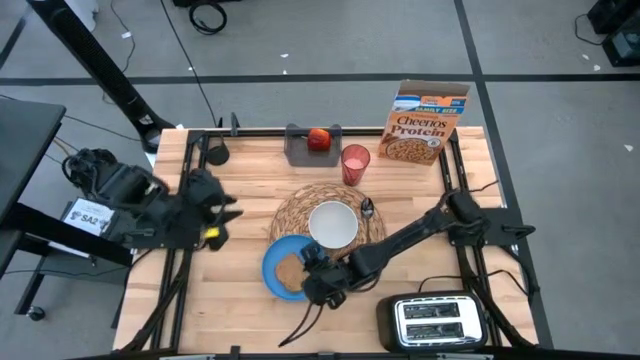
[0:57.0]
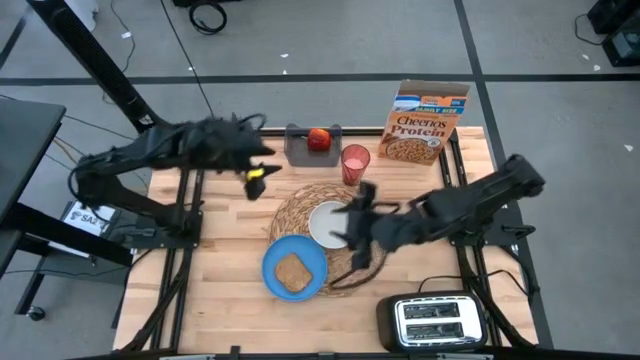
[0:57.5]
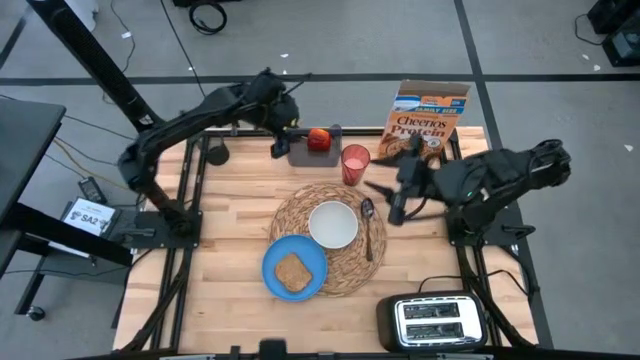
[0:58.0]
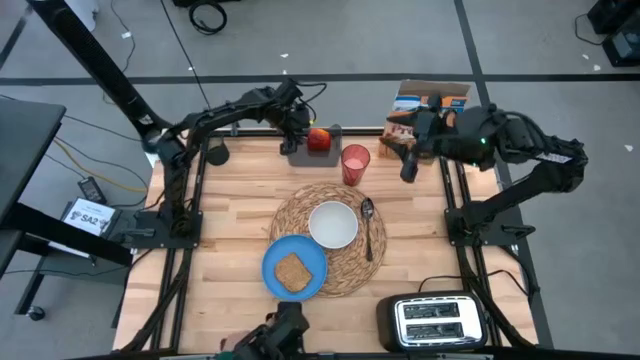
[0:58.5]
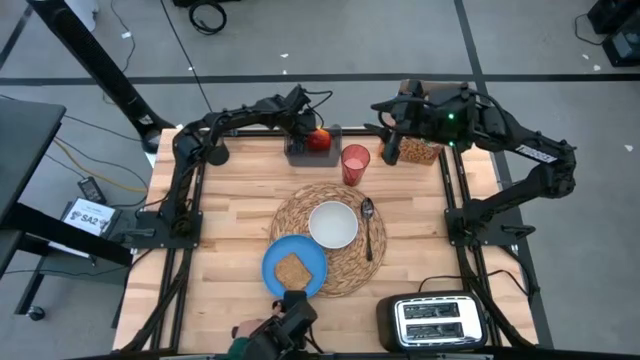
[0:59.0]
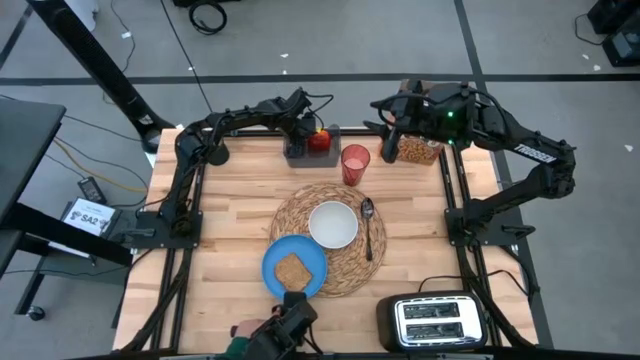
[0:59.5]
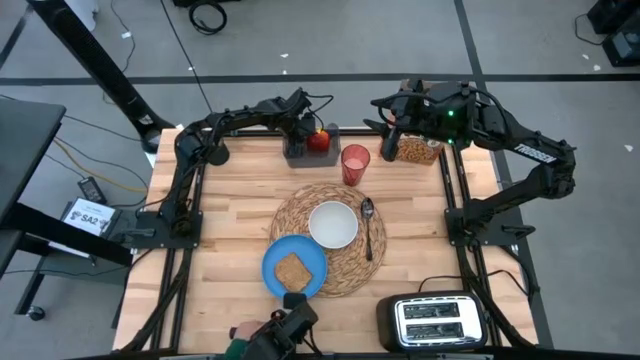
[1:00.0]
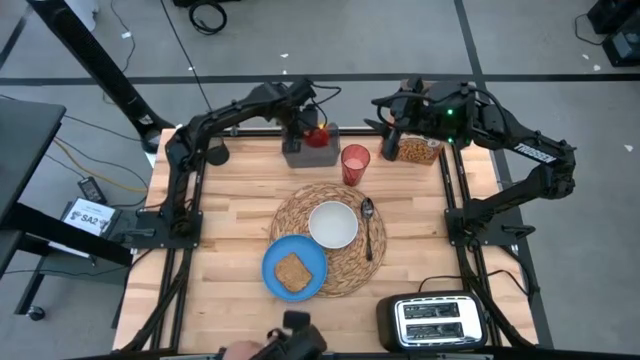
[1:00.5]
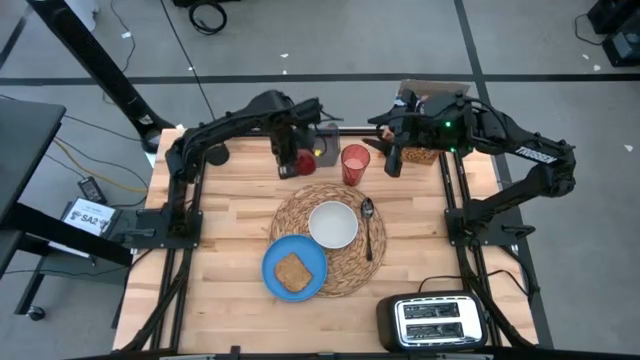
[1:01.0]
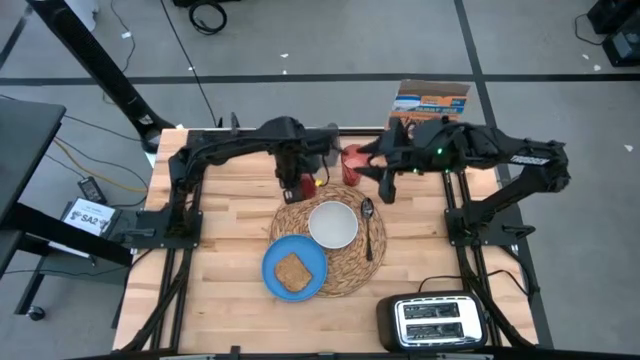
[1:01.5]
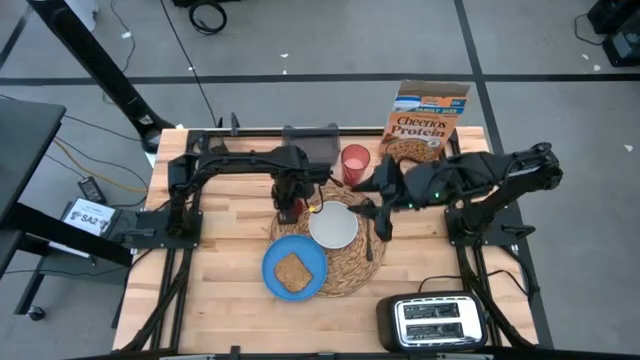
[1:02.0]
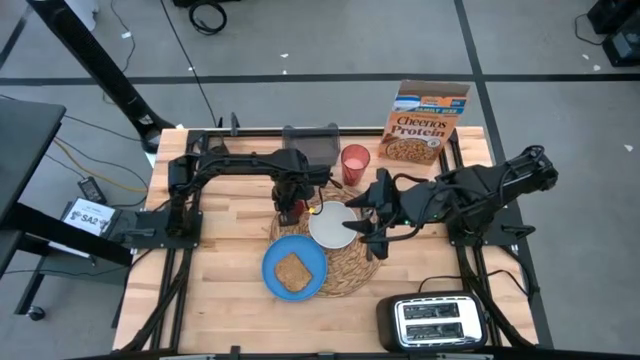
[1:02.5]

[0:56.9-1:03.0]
Task: Arrange a breakfast setting
Put the red apple on the brown tablemat to the top left of the white bowl

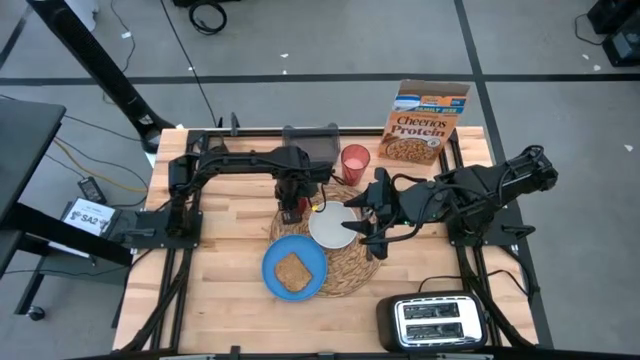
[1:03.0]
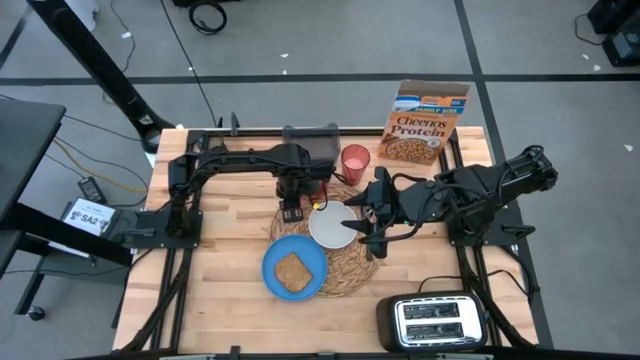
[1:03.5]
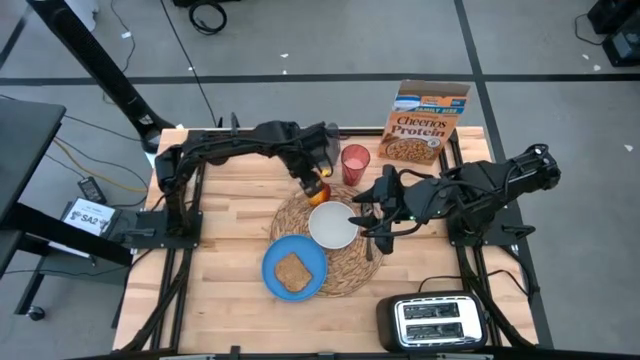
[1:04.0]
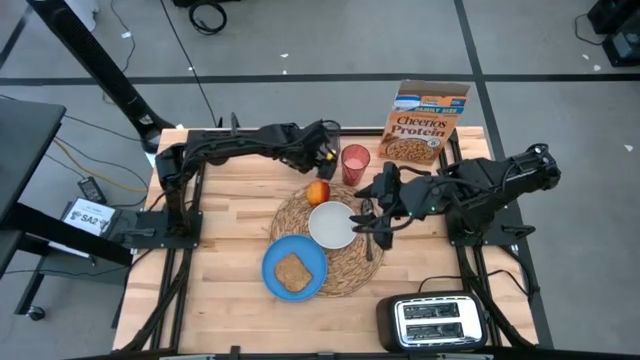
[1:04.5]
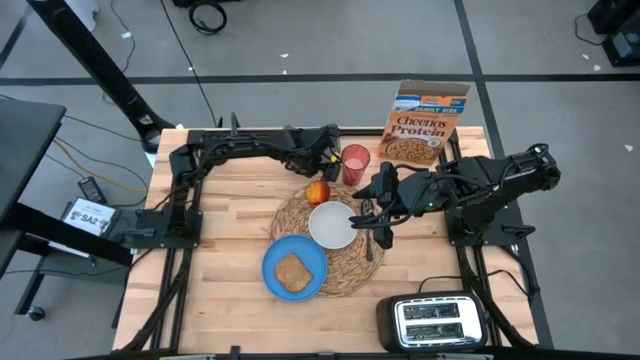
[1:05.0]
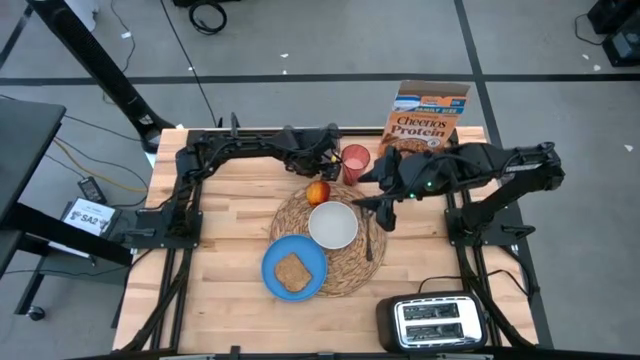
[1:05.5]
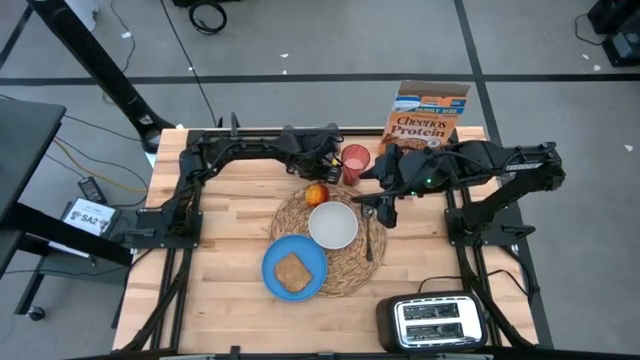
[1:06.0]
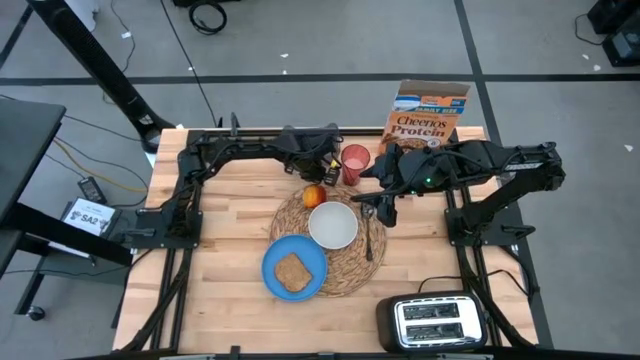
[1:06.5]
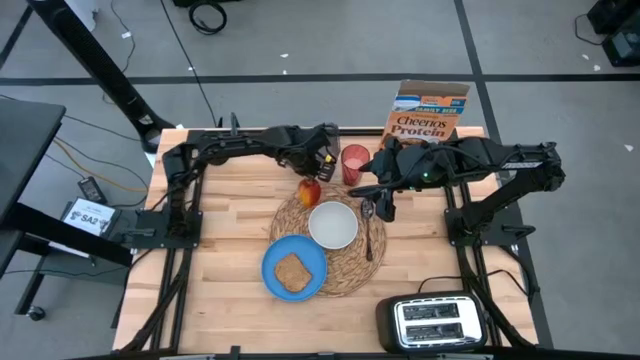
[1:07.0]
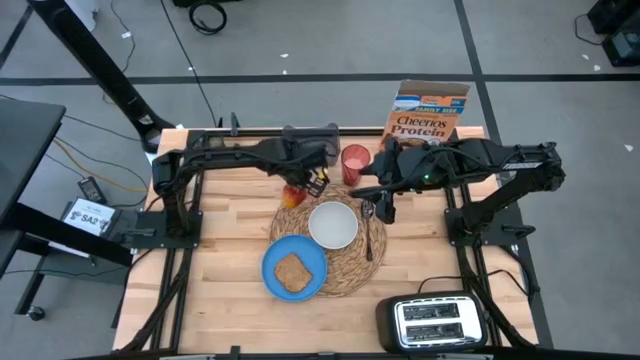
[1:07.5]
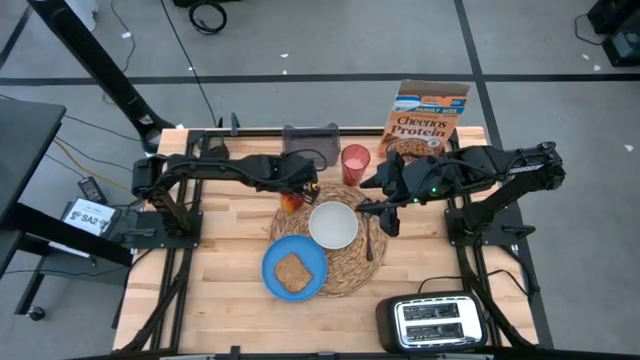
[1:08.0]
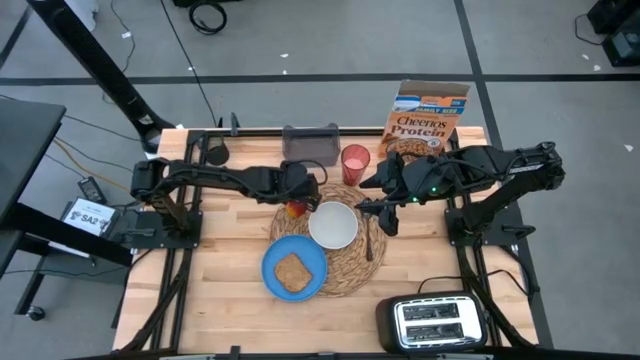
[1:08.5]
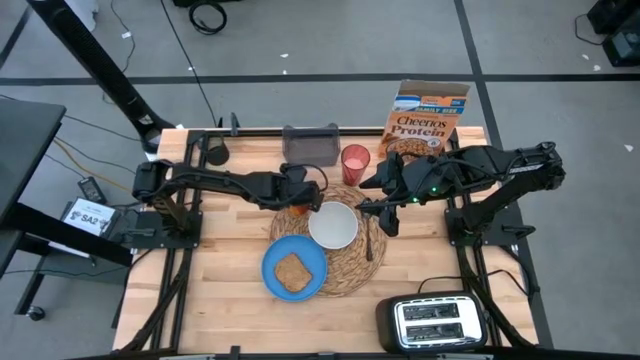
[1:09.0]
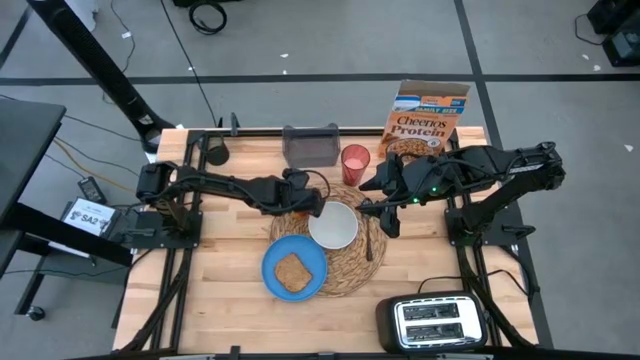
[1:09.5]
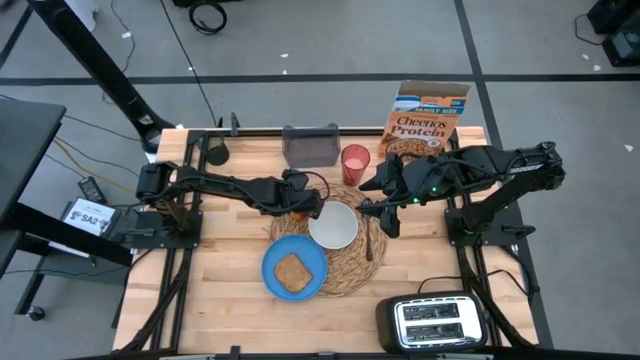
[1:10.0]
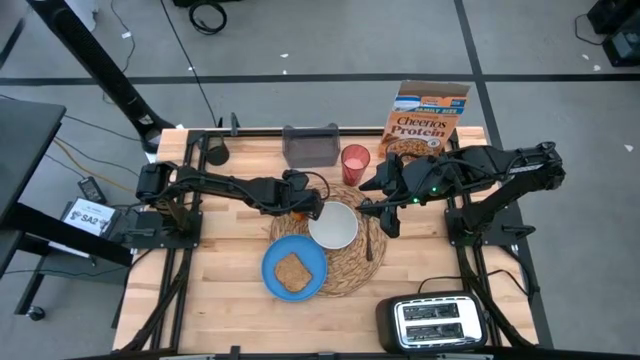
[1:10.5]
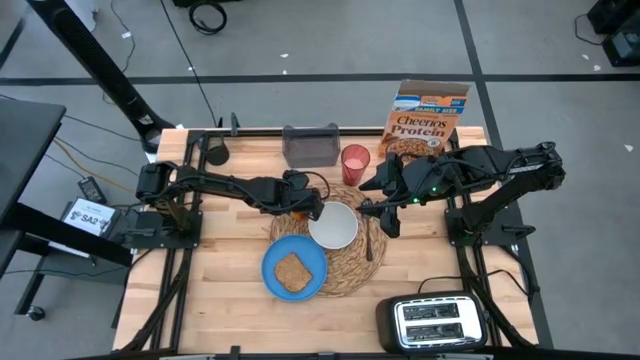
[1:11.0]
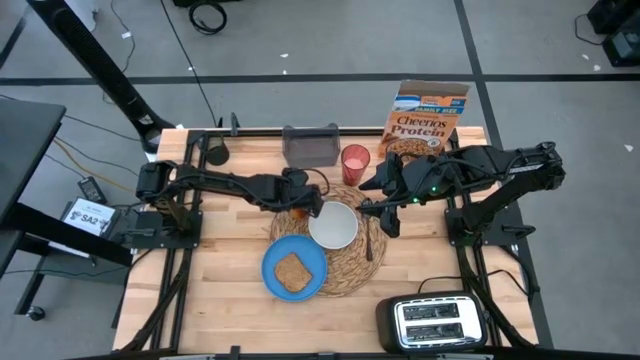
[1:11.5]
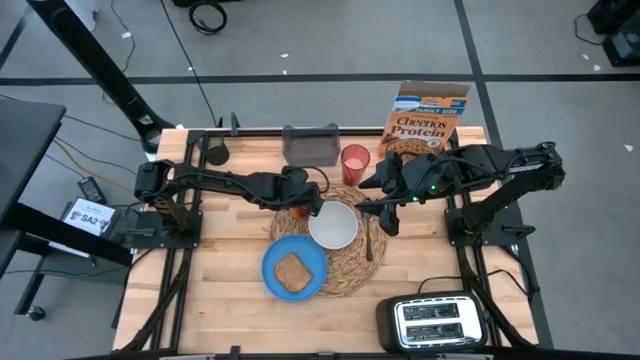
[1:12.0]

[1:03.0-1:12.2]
Put the red apple on the brown tablemat to the top left of the white bowl

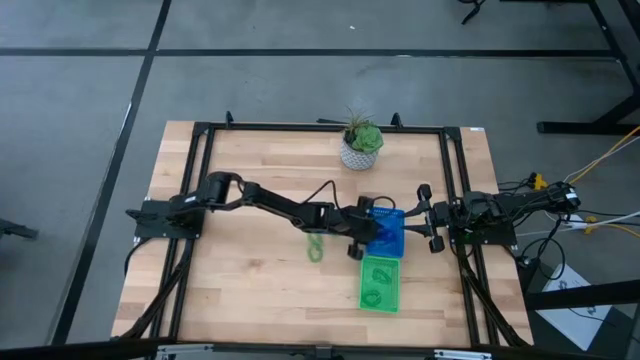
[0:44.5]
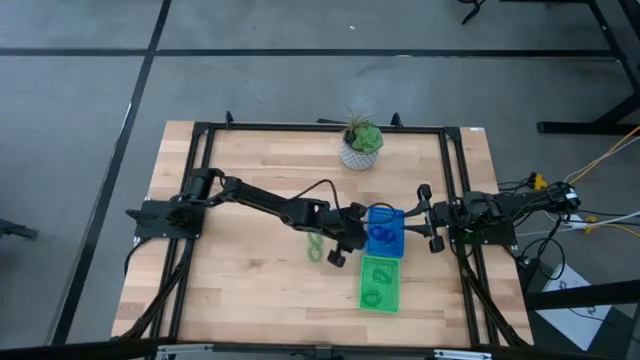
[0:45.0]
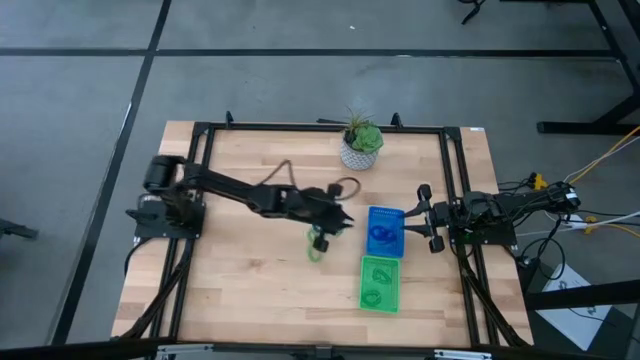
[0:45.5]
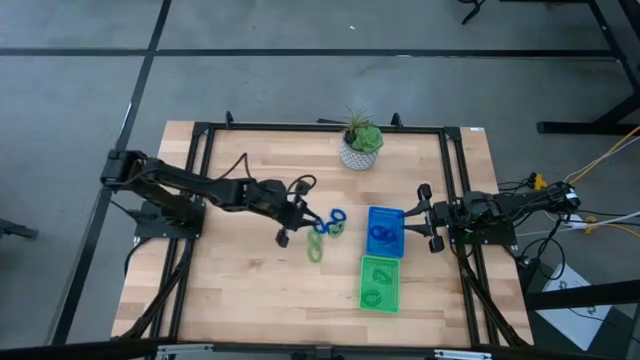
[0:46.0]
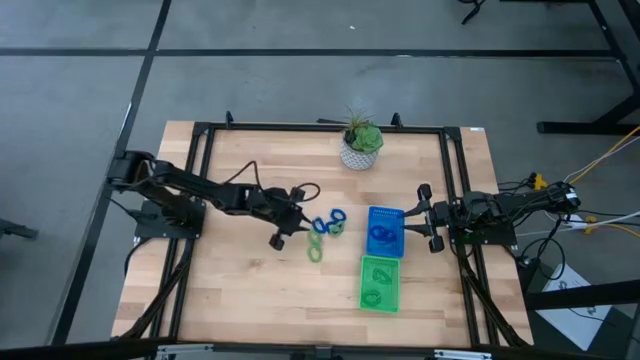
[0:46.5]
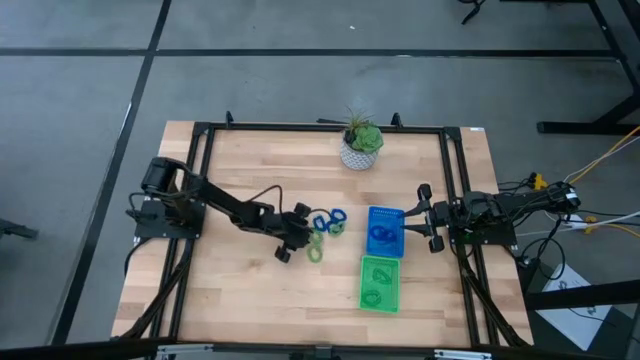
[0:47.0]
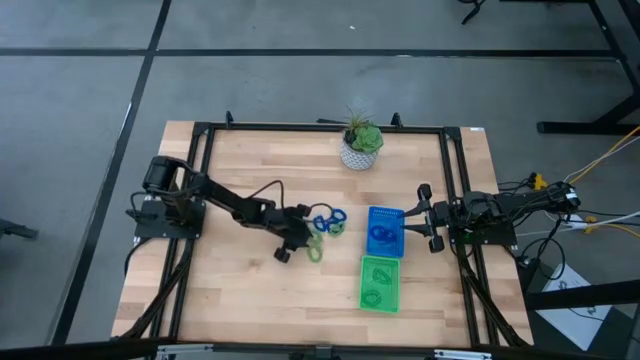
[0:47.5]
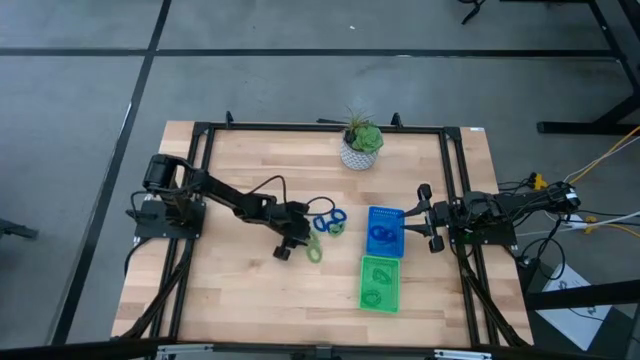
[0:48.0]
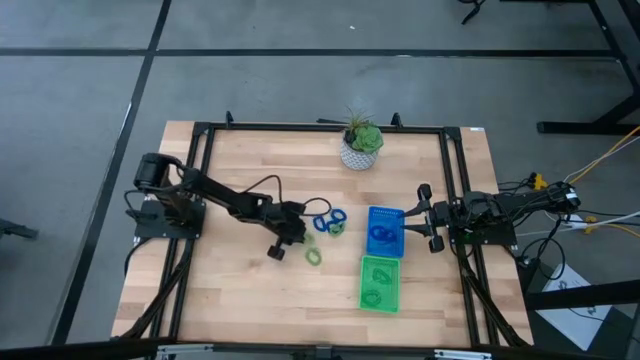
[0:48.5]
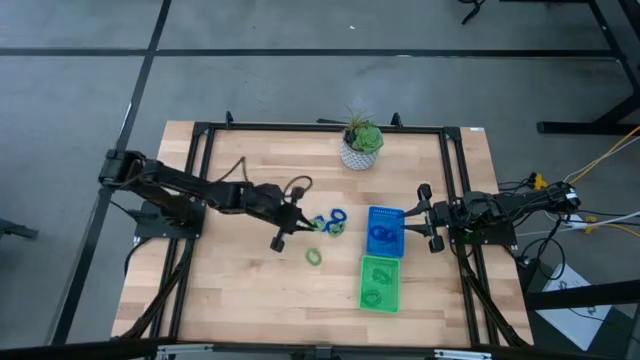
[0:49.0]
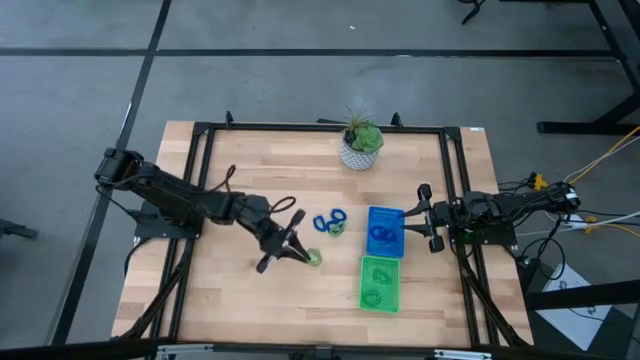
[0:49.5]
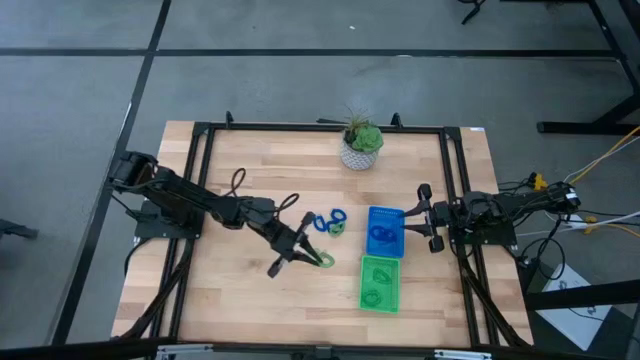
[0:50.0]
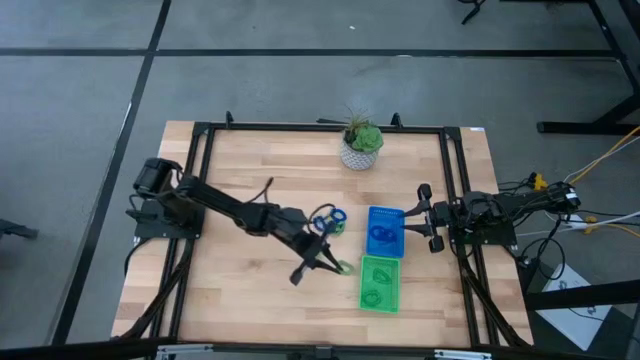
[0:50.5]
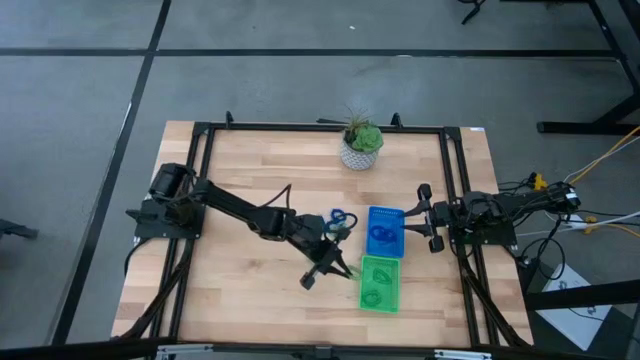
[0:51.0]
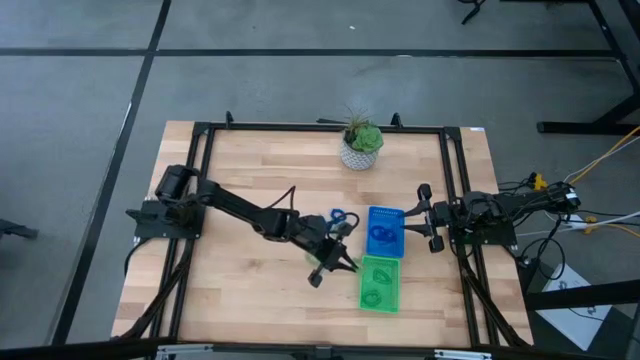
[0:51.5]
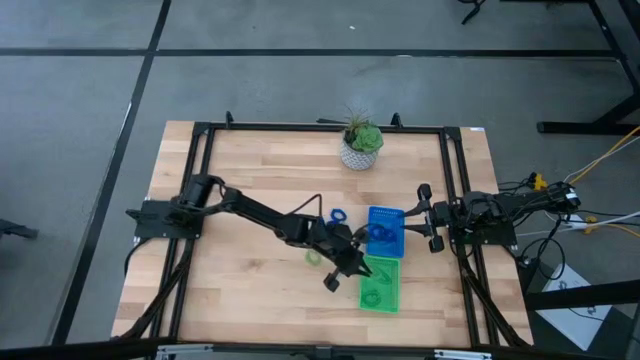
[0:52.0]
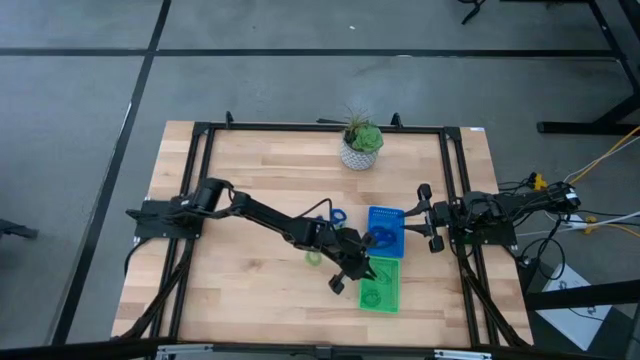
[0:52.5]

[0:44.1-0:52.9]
Task: Sort spring keychains
Put the green spring keychain into the green bin
